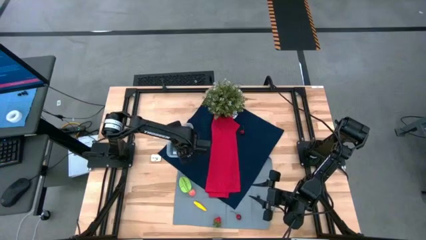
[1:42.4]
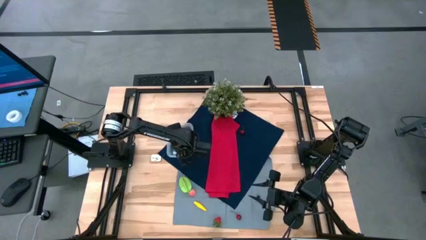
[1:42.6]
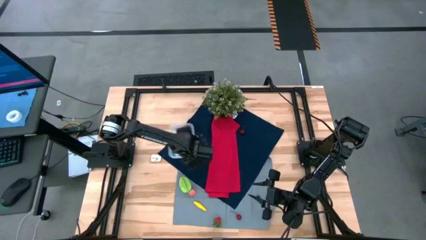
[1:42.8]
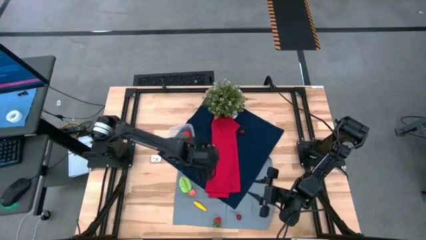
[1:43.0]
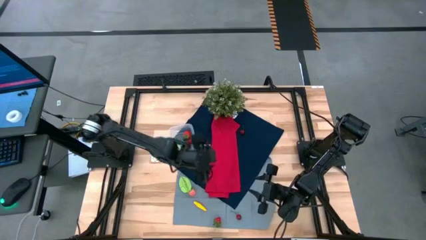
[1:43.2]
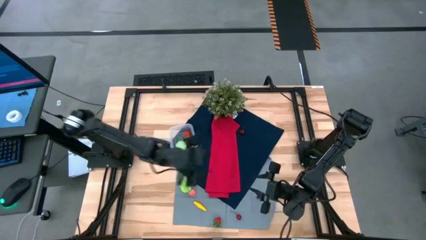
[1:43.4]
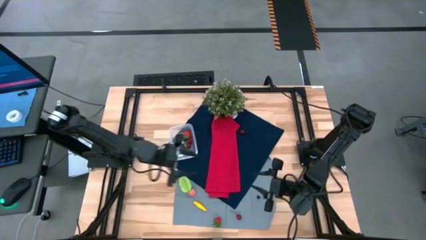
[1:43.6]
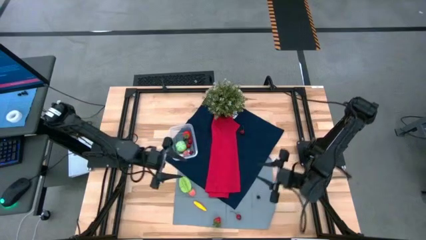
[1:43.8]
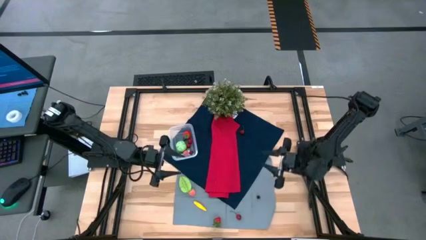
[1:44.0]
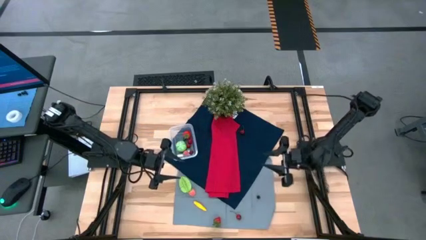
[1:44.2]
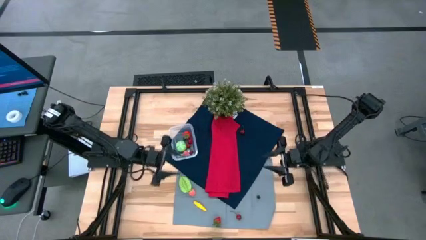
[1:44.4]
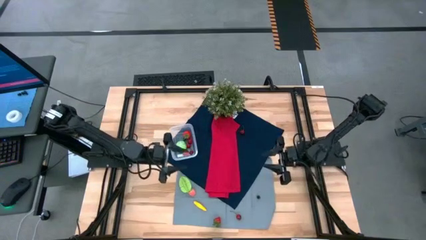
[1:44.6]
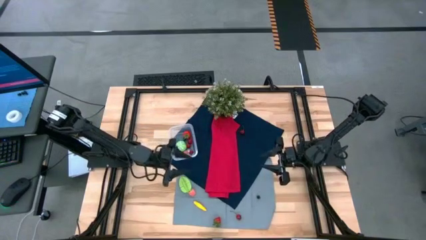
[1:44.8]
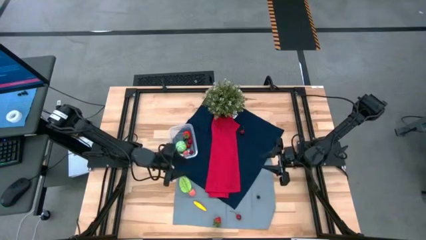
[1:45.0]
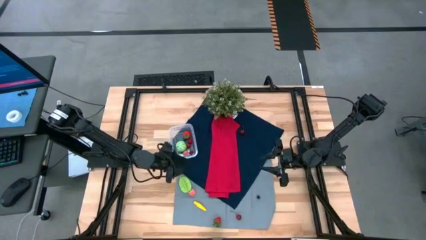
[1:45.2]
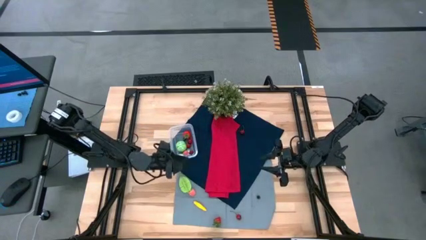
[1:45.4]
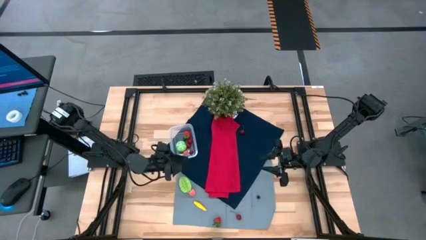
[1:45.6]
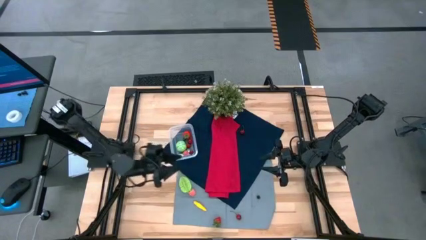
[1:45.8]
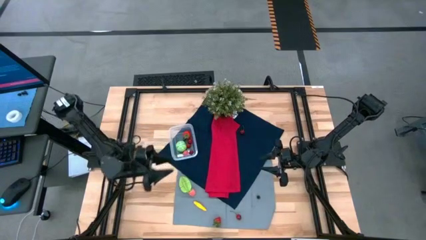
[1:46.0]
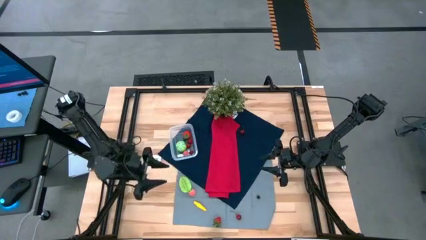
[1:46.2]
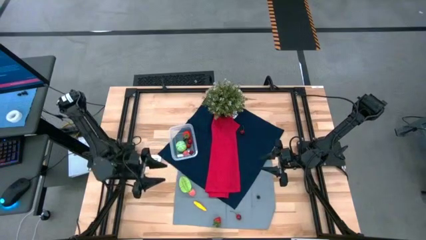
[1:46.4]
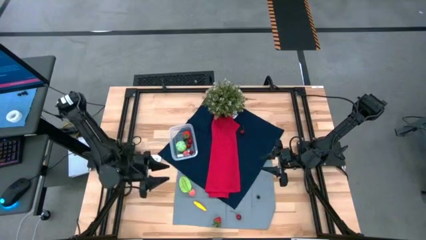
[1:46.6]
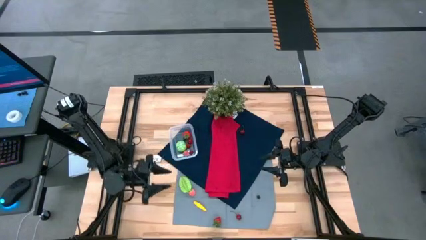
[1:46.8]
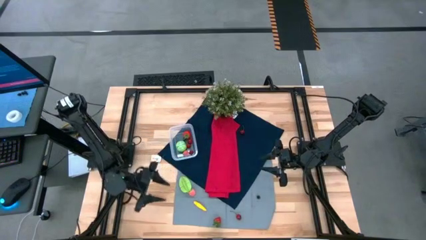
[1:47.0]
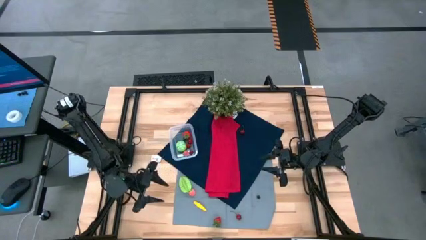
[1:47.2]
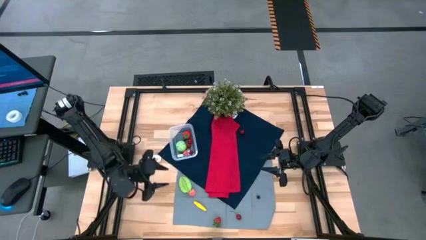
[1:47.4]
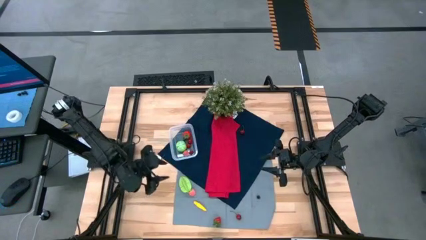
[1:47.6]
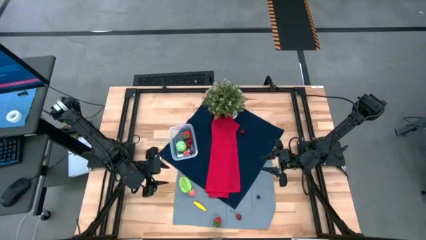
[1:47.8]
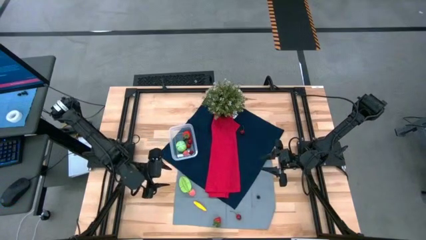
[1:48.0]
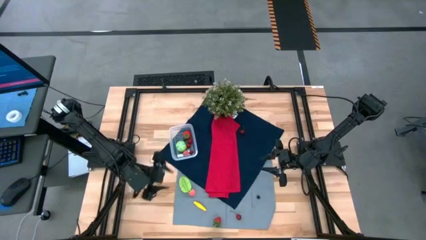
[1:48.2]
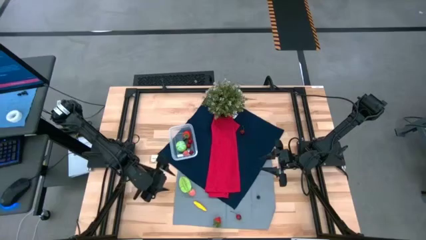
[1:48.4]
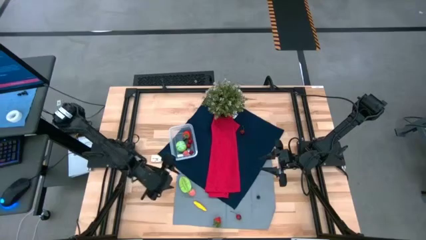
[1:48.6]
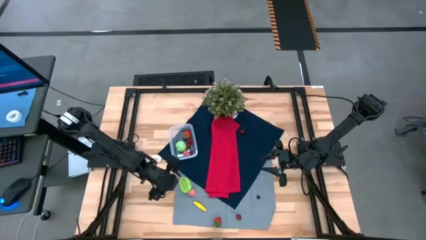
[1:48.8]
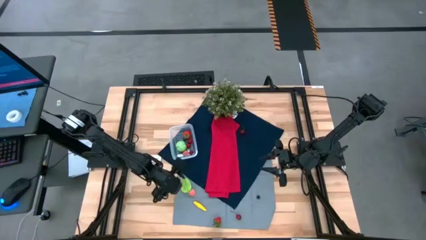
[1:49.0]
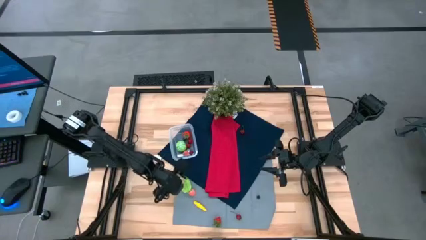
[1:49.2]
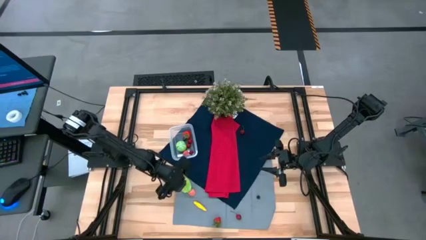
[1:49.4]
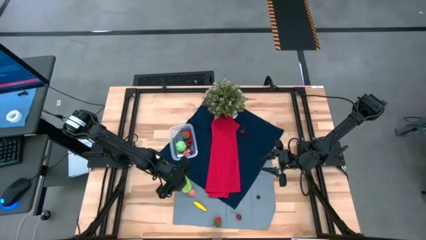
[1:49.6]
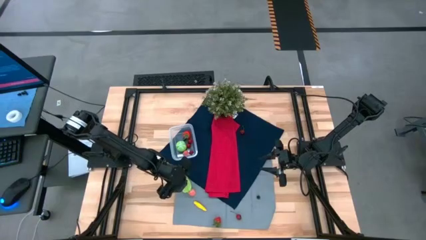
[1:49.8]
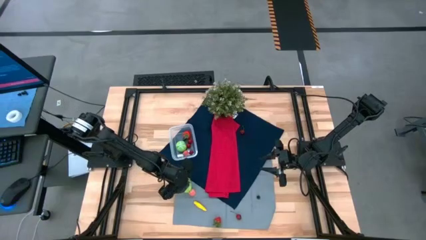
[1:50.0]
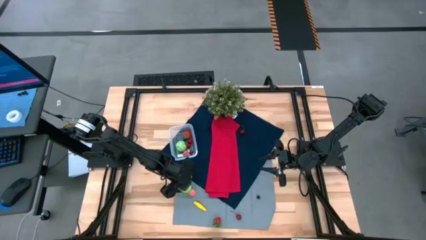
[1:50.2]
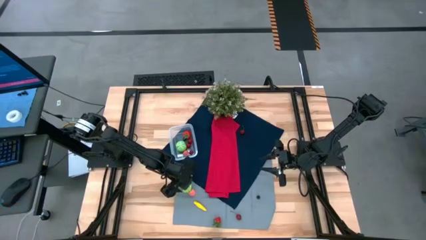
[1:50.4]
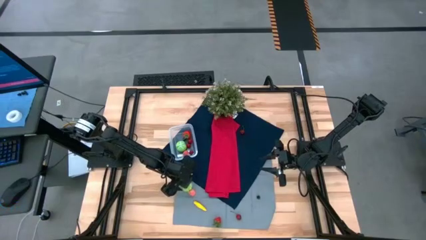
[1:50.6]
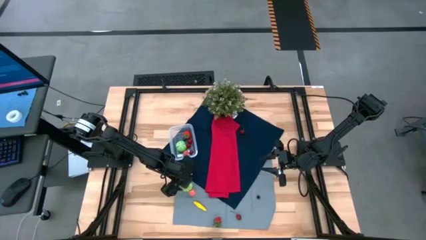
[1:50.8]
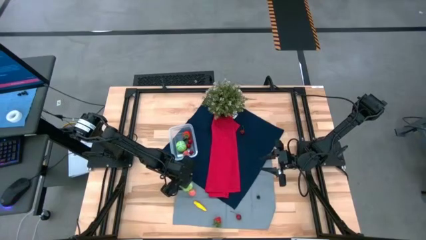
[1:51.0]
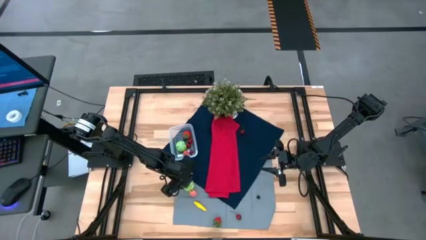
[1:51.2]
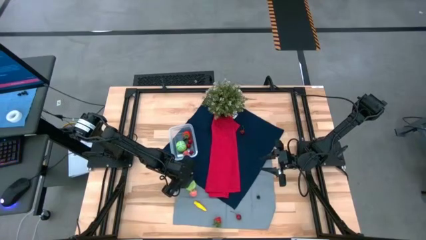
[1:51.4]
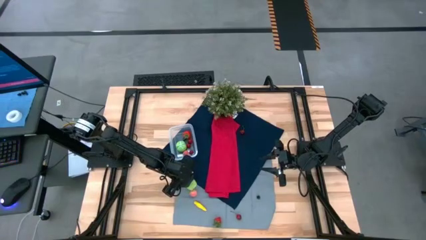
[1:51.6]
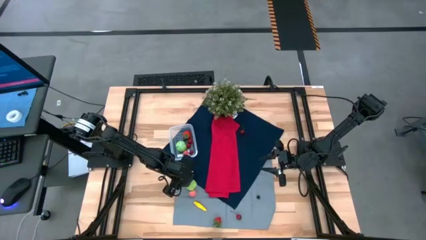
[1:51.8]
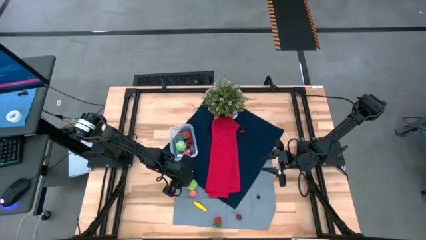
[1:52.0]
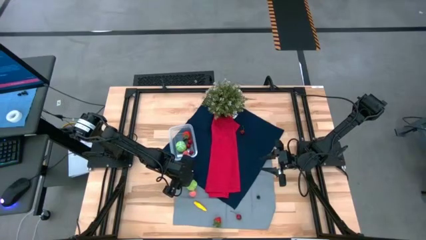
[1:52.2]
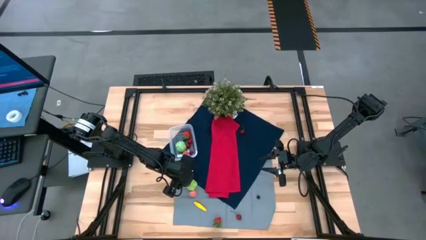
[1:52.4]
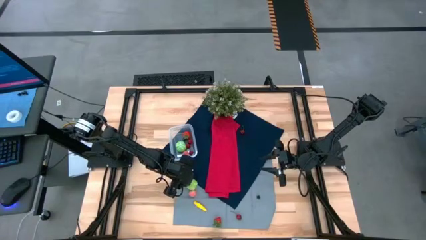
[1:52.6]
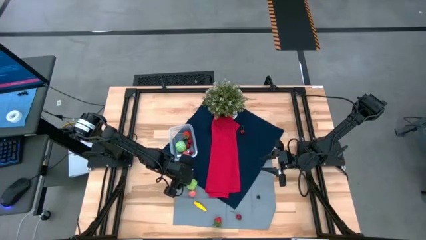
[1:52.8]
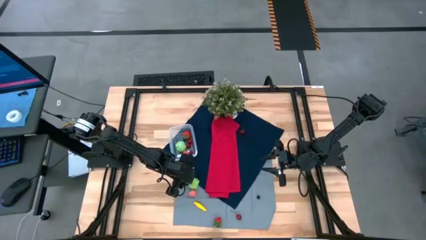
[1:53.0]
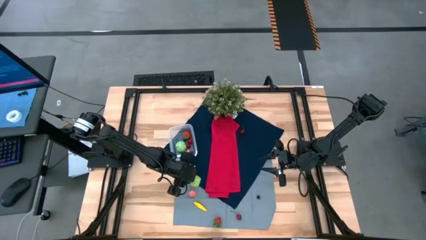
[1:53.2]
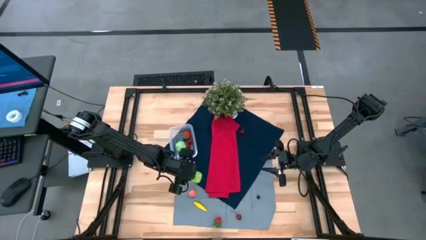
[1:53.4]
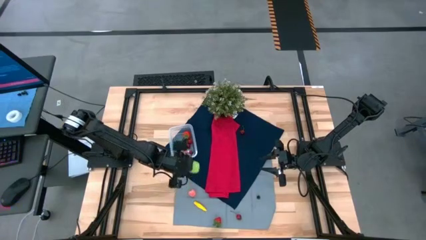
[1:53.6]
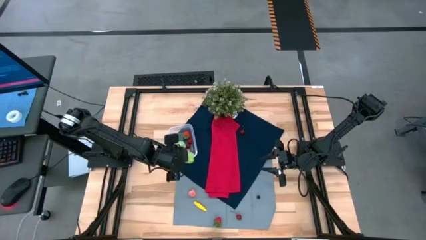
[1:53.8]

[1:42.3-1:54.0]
Task: Pick and placing Produce into tupperware
Put the green starfruit into the transparent bin

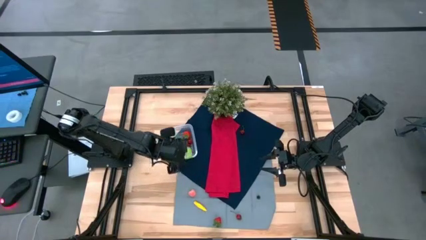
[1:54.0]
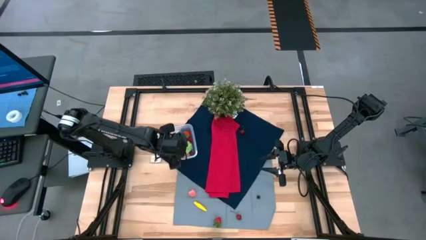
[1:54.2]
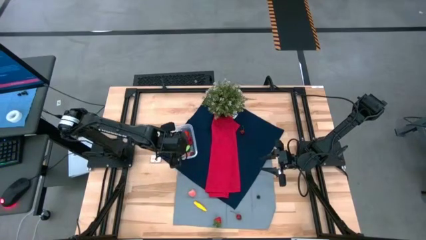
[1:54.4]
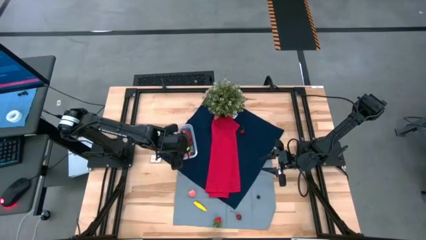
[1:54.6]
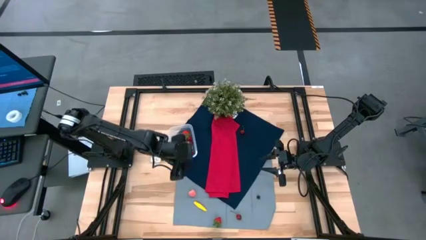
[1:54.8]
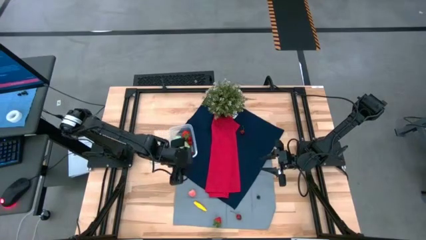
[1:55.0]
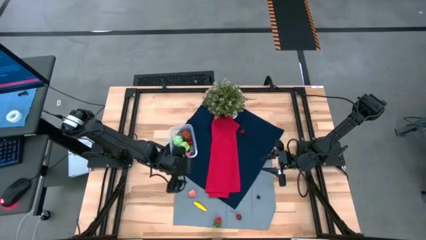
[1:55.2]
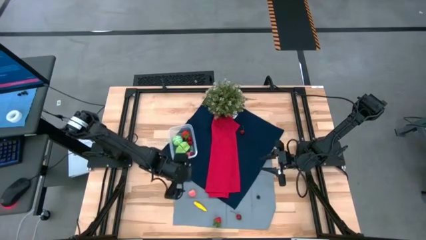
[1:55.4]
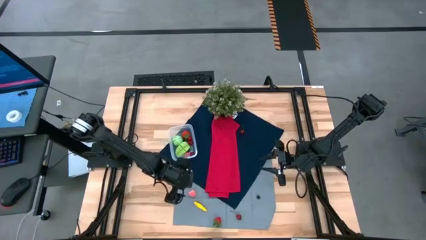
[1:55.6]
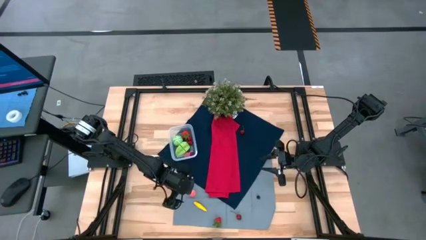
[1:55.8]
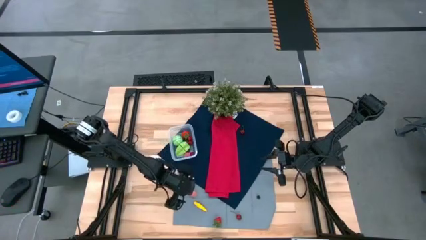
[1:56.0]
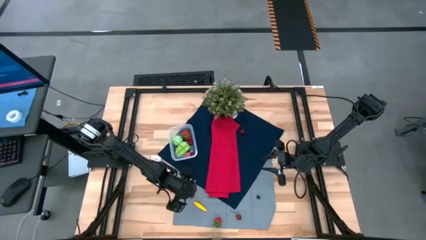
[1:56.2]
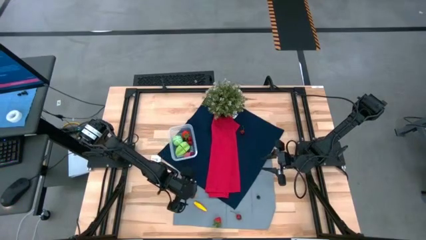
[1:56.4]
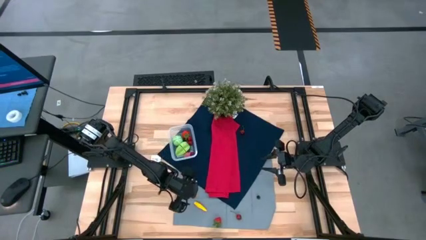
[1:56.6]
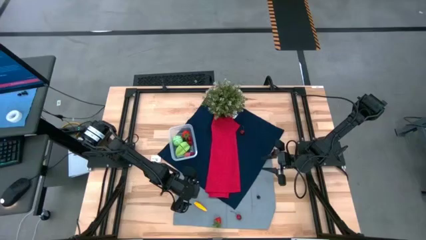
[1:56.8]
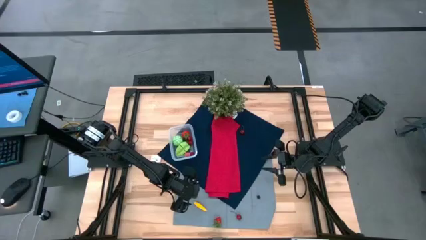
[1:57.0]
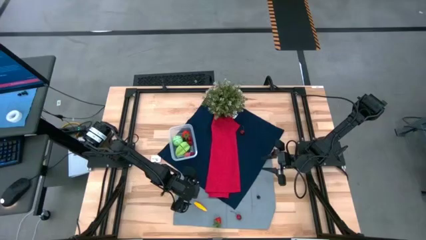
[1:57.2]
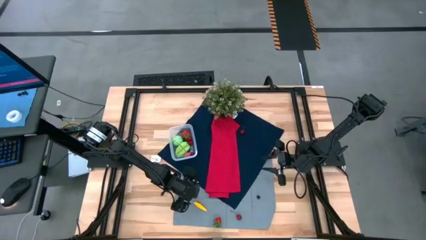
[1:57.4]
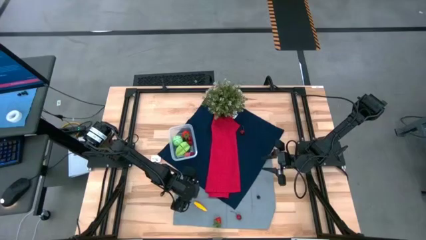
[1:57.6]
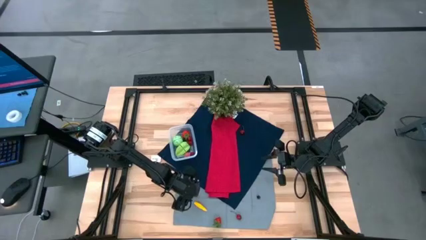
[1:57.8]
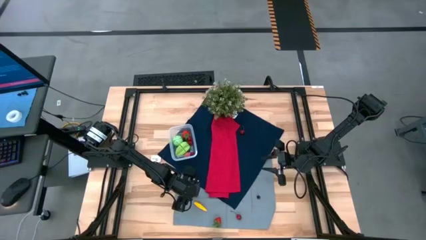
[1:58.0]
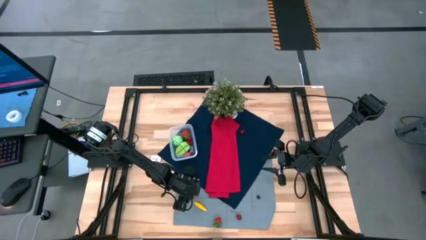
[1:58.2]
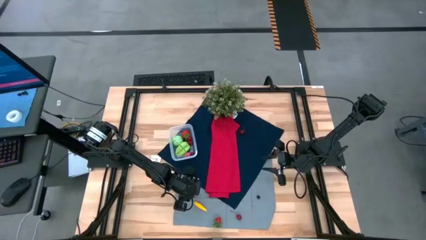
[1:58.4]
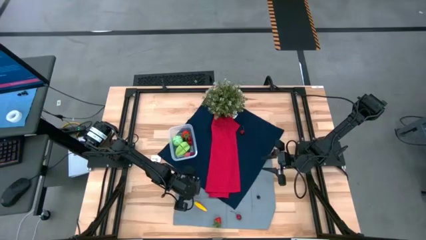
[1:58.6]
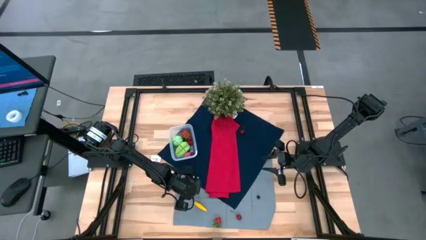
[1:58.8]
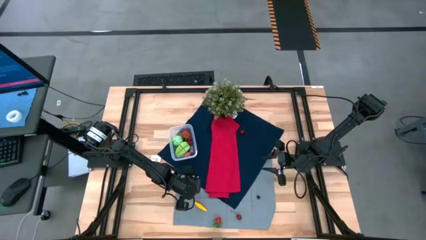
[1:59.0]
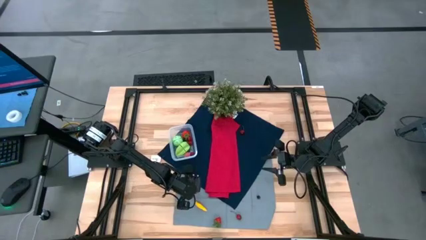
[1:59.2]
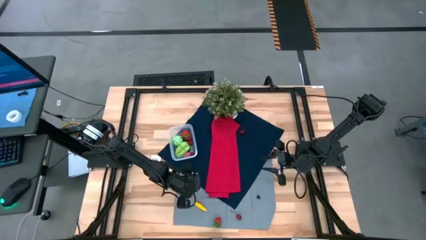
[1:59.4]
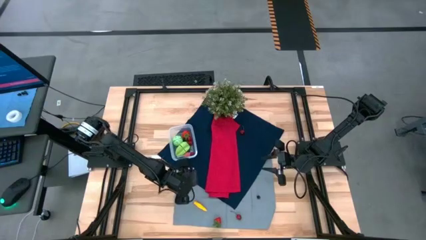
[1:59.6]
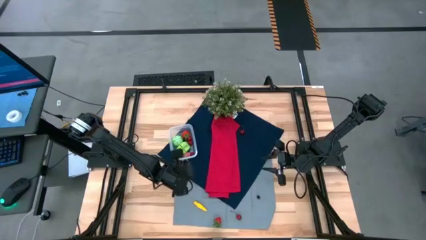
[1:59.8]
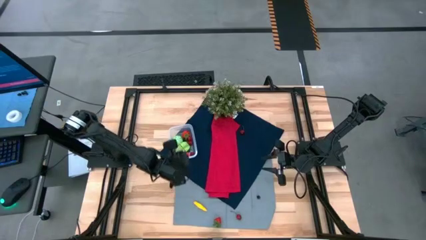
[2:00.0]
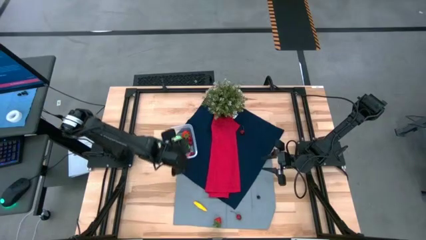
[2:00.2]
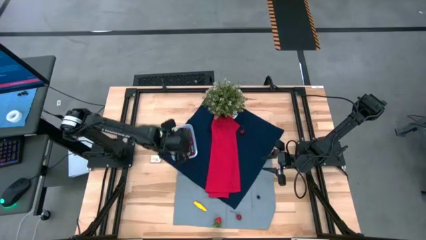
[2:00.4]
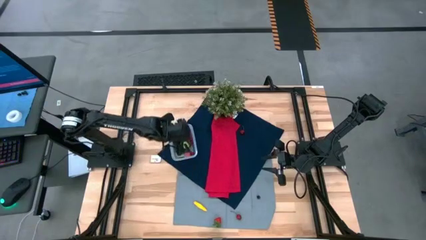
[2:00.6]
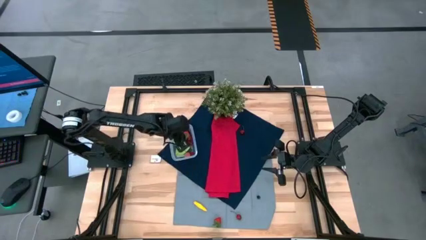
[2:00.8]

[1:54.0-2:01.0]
Put the pink peach into the transparent bin
